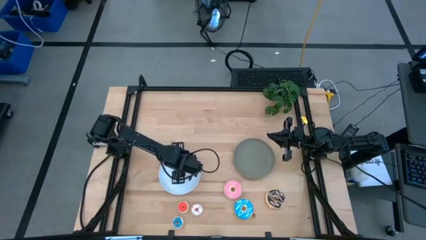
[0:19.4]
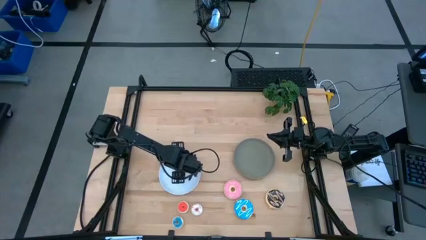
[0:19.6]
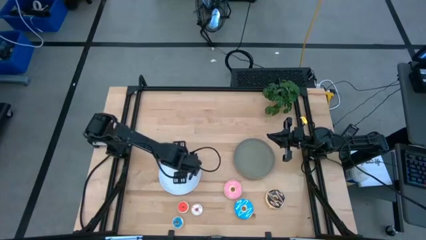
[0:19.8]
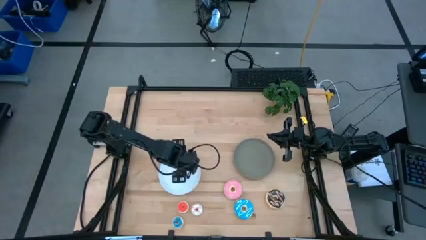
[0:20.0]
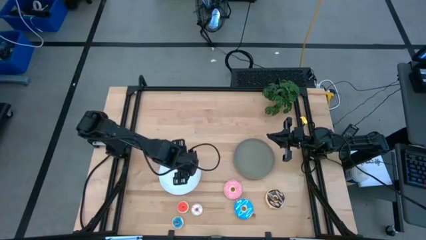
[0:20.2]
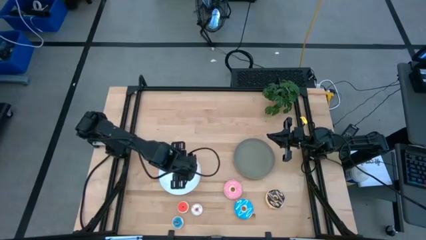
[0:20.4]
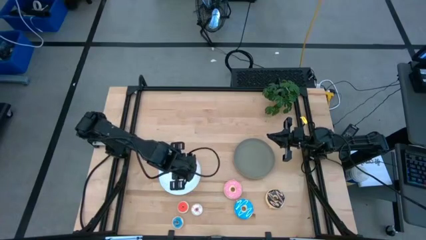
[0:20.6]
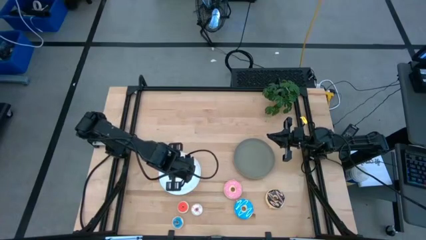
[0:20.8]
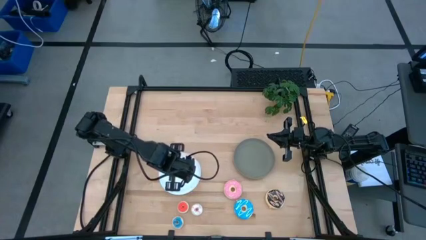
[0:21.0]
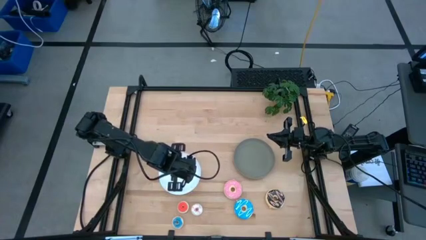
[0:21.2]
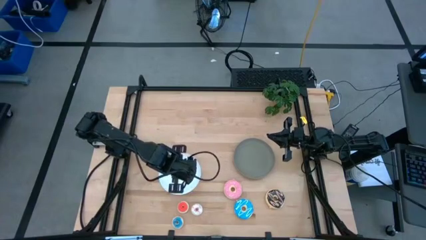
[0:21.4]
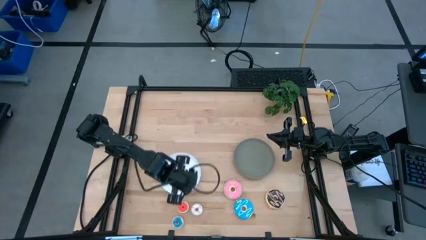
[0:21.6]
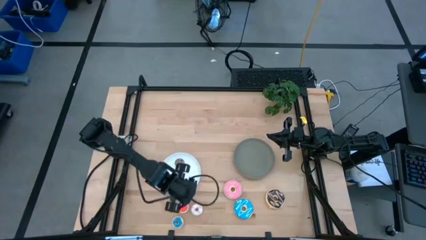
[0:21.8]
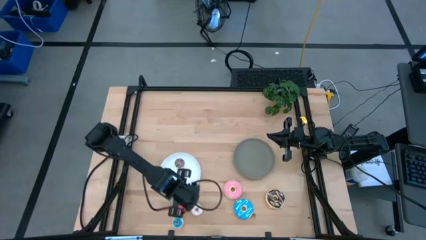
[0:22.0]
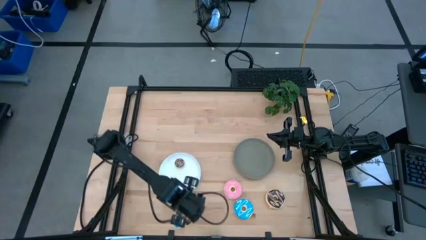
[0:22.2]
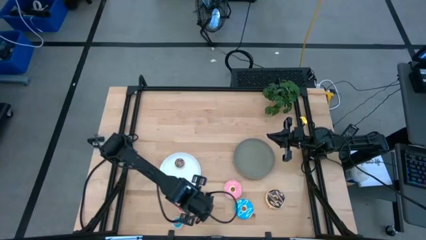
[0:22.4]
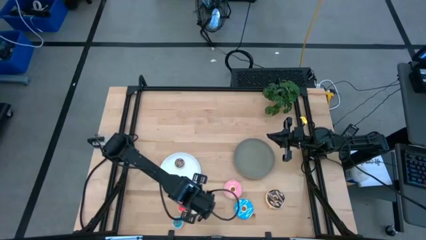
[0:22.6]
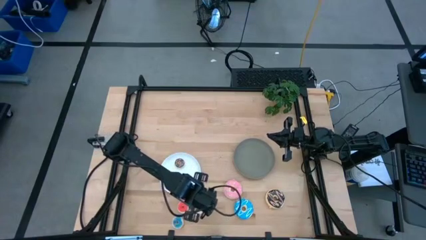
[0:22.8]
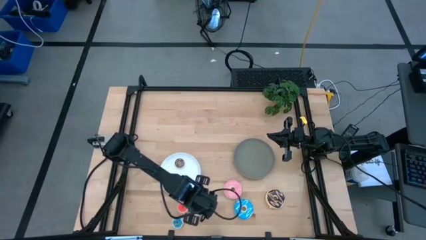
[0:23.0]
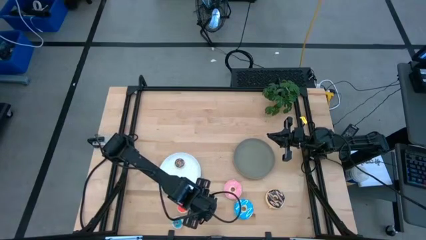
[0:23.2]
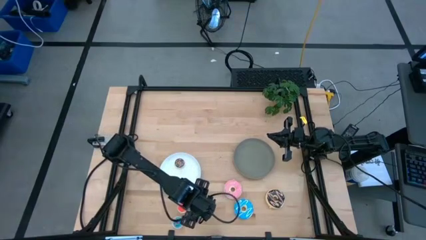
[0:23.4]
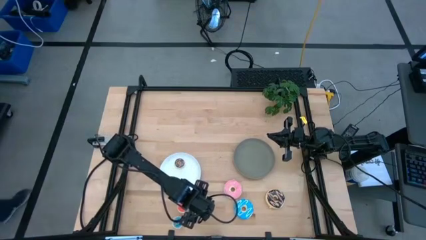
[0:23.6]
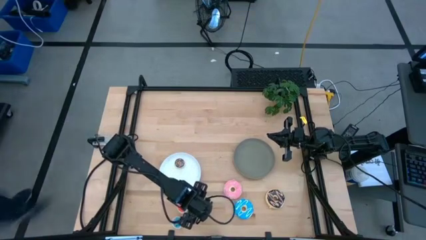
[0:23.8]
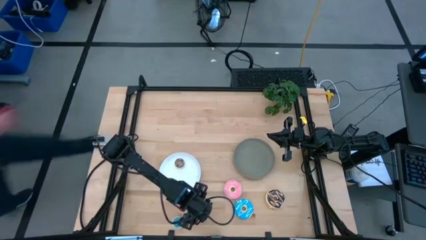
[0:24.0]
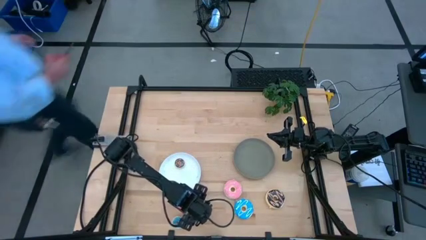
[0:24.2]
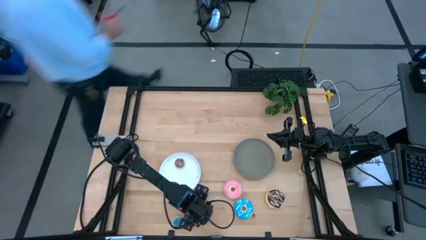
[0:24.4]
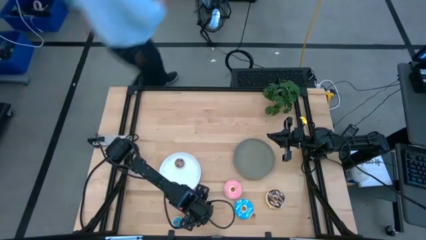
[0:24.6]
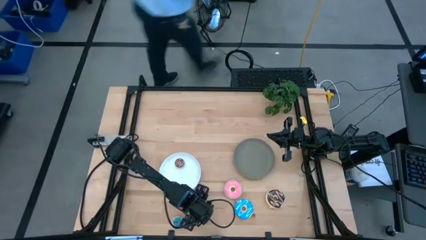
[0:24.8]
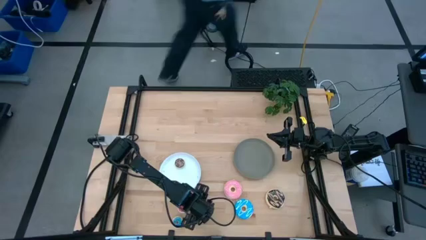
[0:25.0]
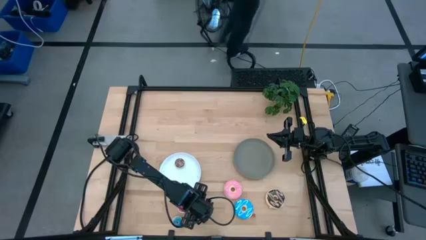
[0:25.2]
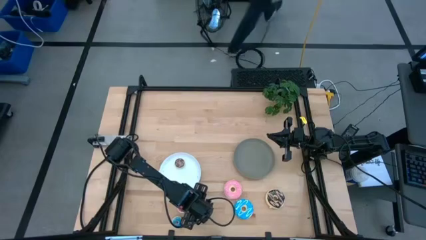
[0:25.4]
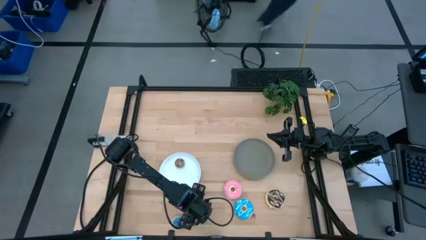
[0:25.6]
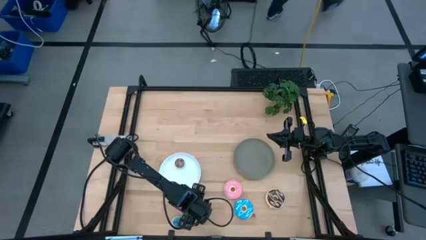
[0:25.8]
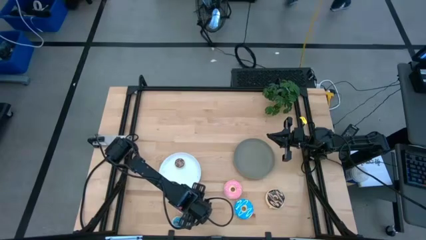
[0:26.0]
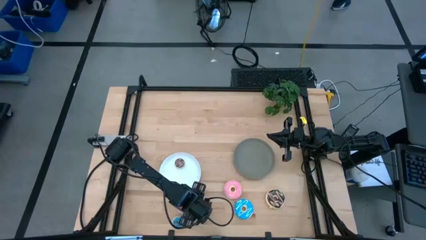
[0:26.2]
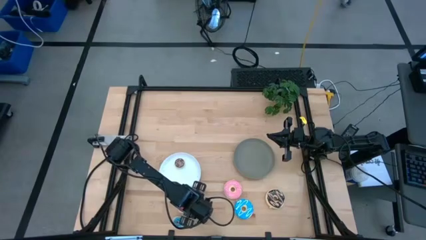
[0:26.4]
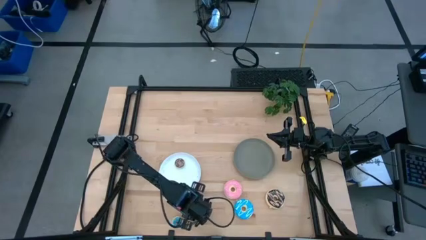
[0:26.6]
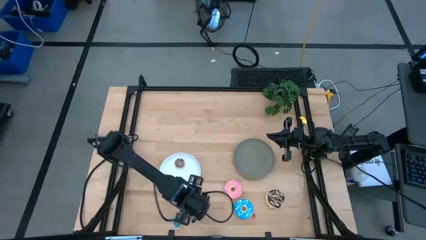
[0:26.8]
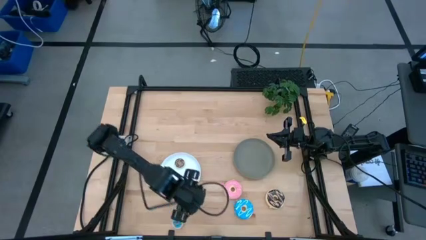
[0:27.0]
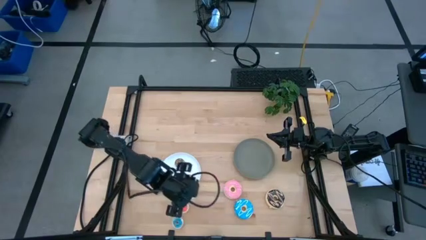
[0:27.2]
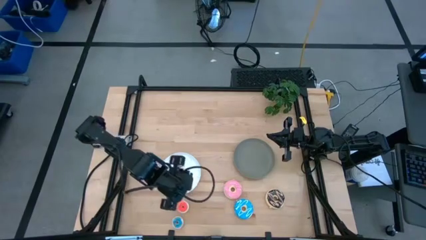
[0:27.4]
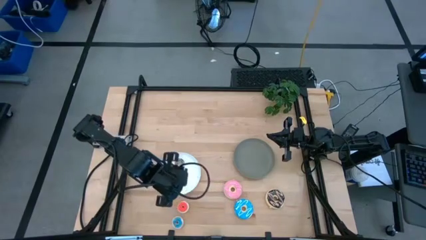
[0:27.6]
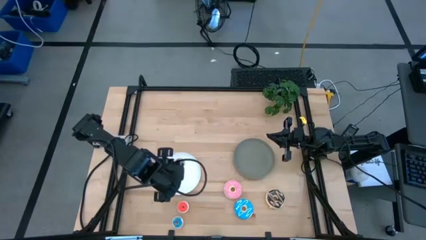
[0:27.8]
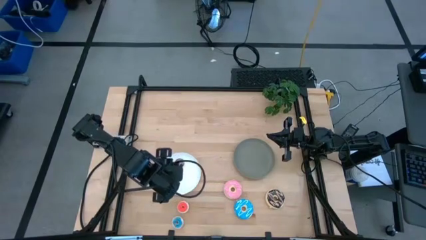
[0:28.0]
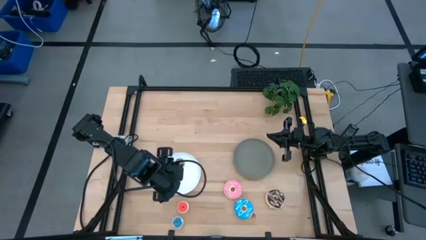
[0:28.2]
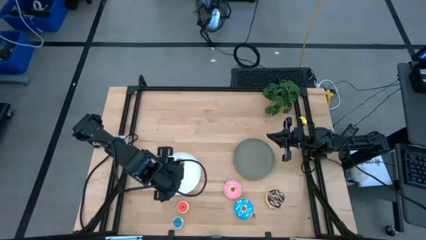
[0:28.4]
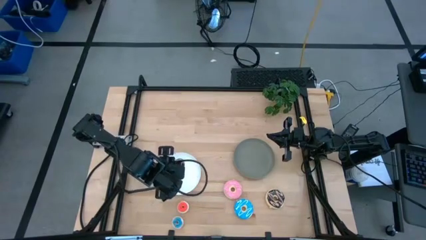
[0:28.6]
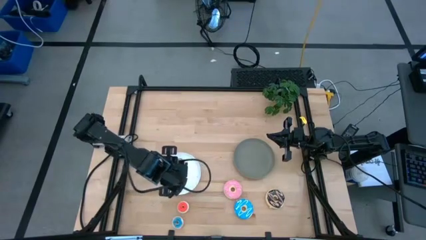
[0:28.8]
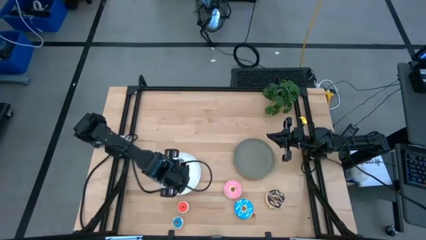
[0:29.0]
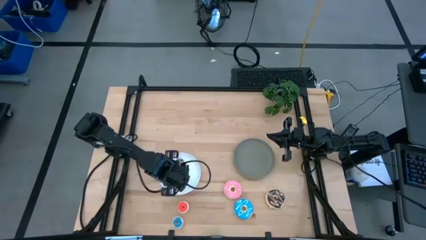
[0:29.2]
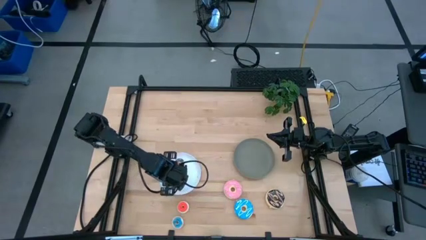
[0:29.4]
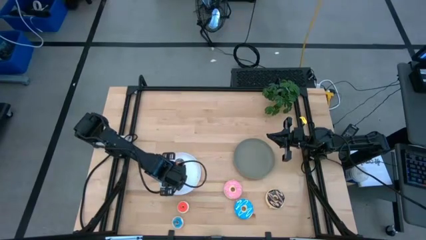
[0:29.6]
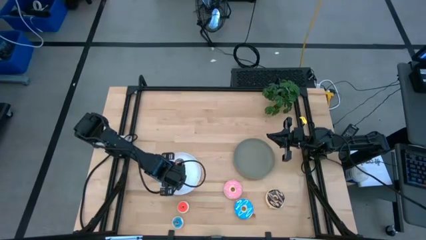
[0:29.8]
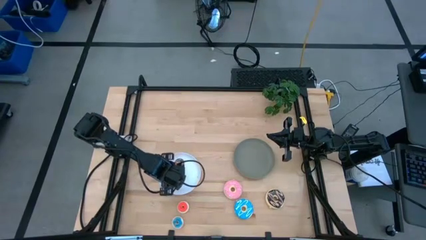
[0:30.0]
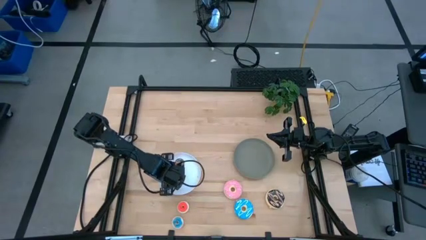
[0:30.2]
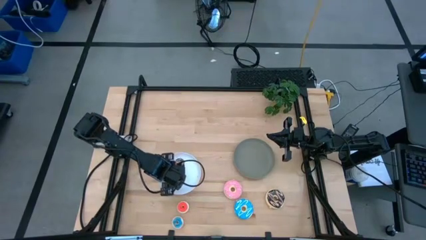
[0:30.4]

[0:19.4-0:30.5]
Task: Pick & Place donuts
Put the small white donut on the white plate

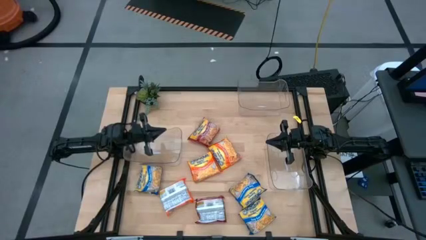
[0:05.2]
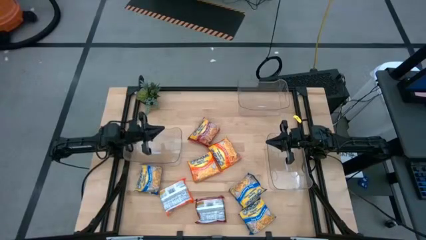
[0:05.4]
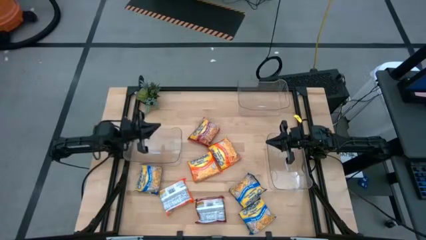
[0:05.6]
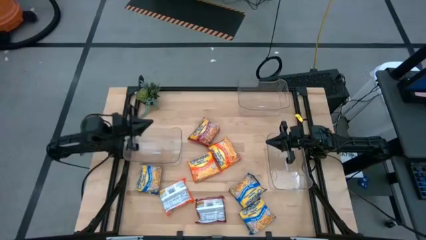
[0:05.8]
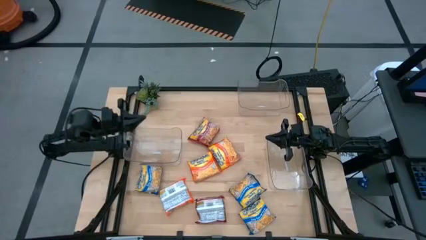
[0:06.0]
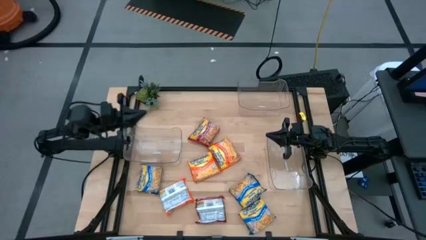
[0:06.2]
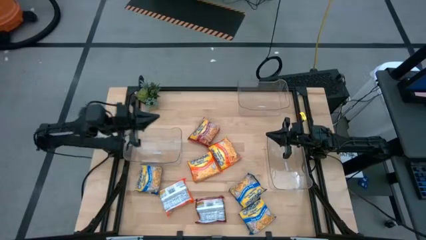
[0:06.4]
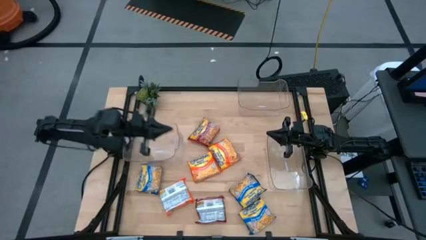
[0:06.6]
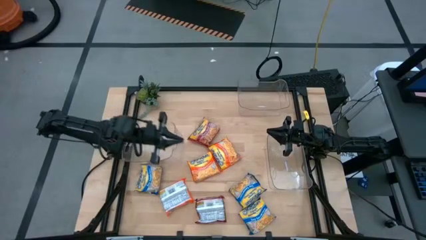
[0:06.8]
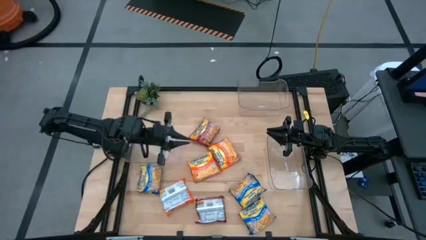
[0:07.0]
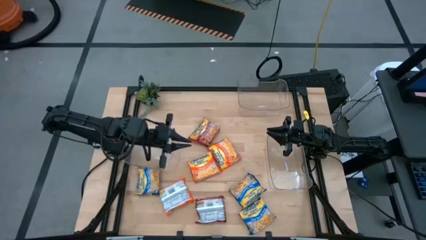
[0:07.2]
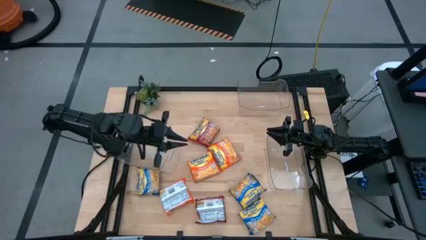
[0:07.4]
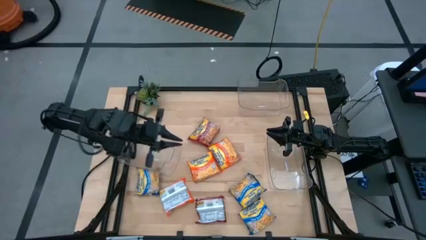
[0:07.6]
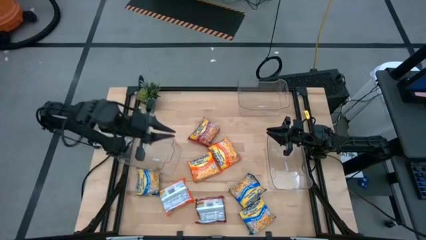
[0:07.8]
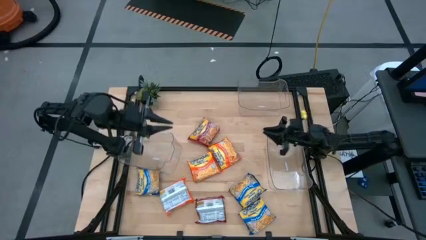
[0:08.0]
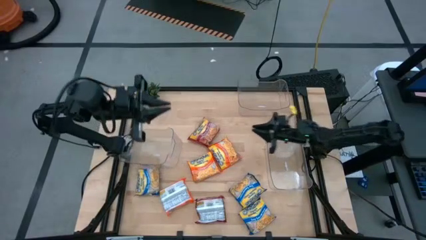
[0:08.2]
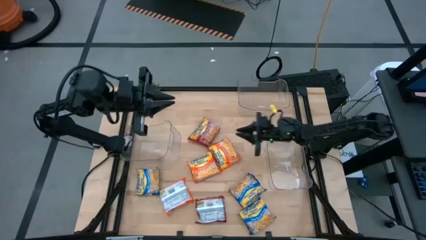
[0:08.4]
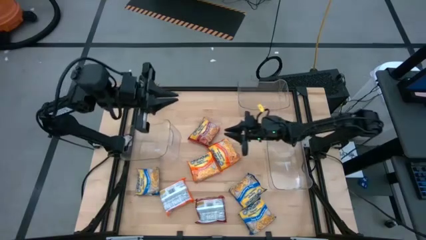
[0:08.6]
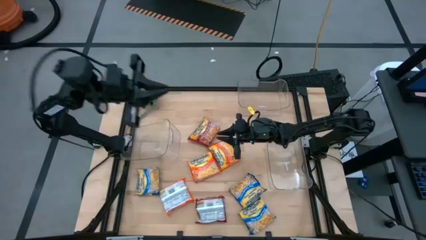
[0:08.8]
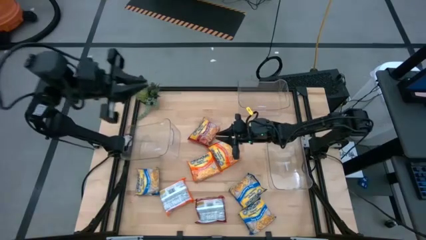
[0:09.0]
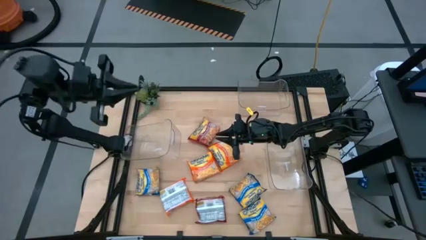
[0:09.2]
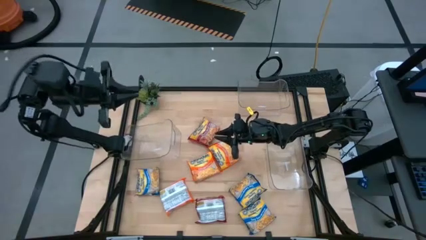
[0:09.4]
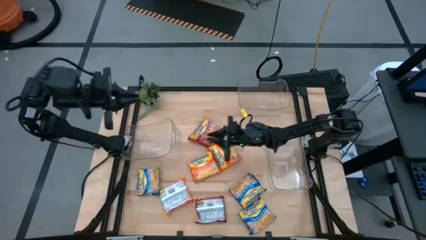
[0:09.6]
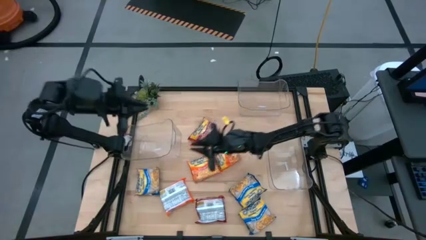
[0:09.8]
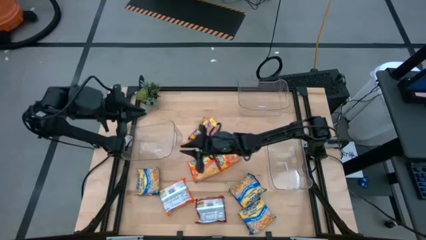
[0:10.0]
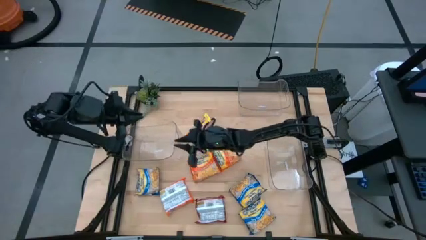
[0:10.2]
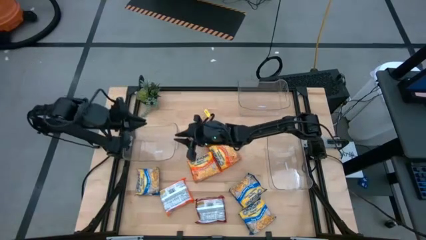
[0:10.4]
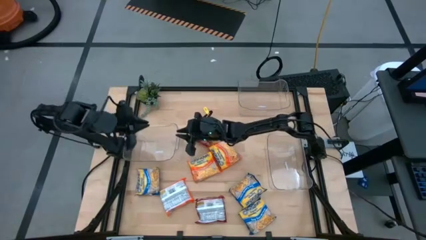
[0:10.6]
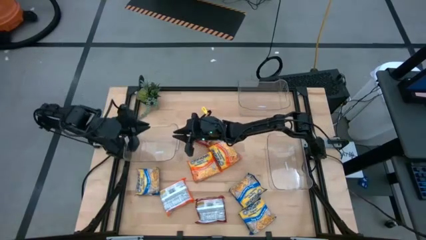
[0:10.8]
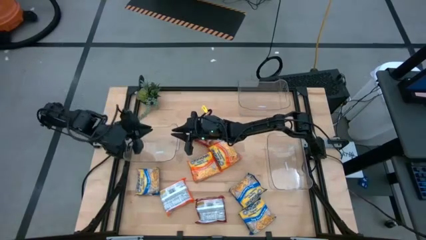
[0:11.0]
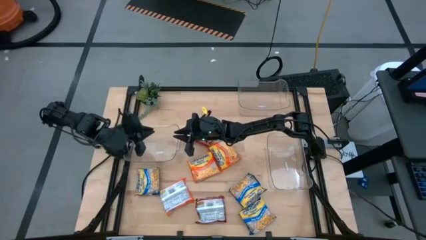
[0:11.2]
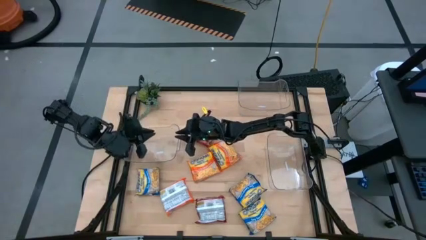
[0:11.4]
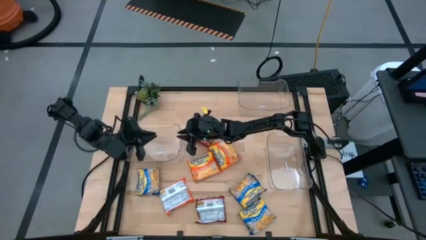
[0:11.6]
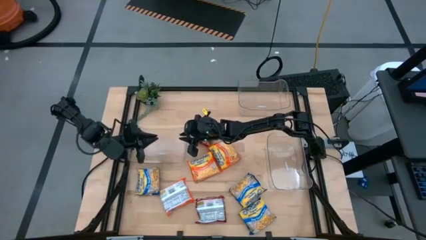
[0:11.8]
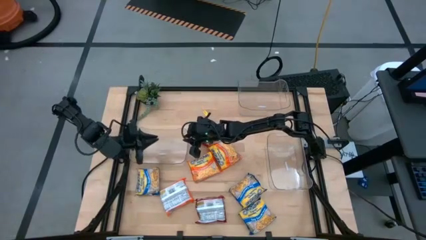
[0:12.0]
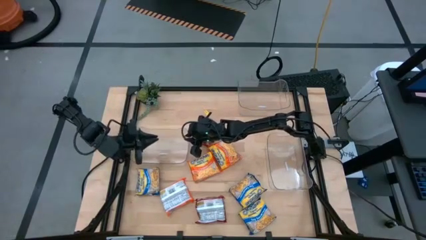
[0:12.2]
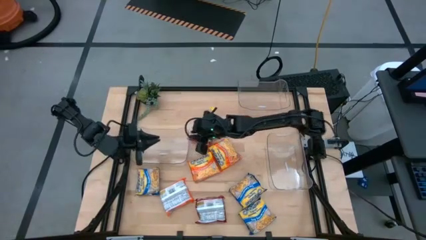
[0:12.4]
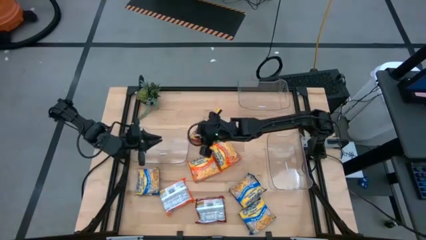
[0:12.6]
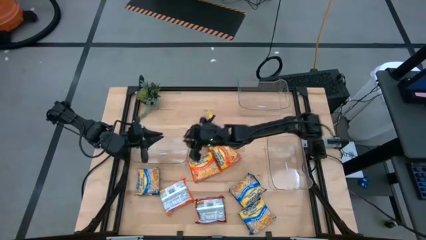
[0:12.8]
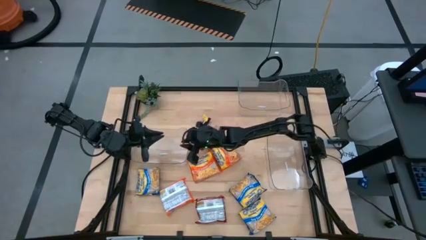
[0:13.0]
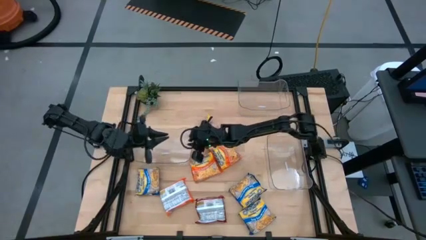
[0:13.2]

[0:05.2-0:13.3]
Task: Sort Maruchan noodles
Adjust the bottom left transparent bin
